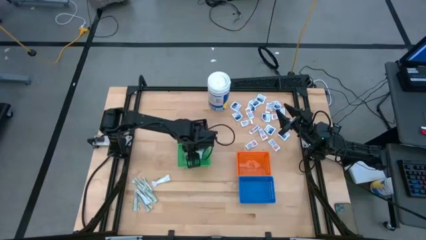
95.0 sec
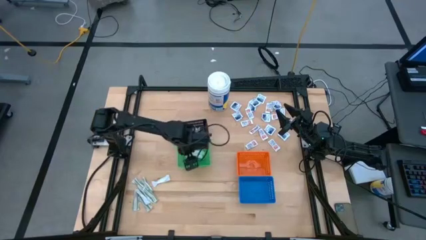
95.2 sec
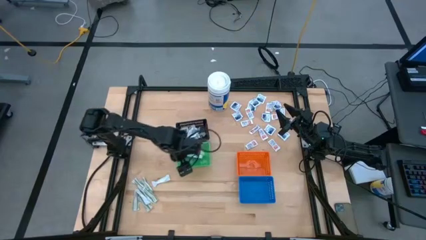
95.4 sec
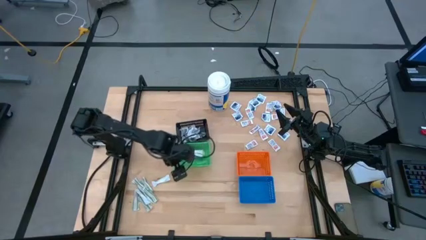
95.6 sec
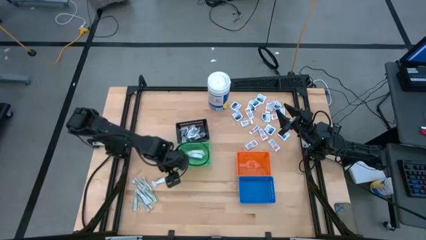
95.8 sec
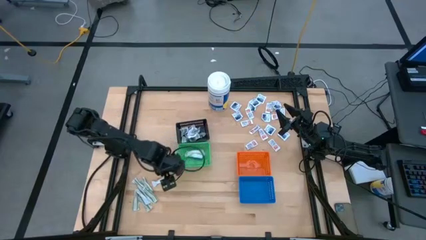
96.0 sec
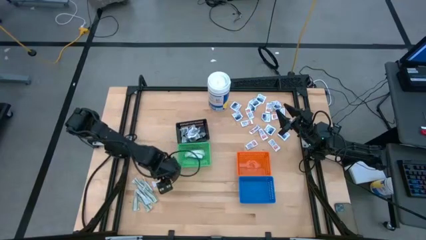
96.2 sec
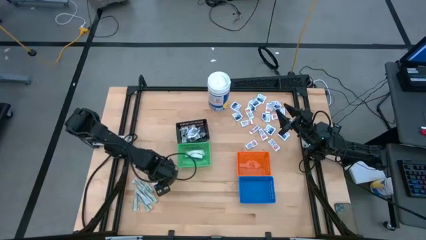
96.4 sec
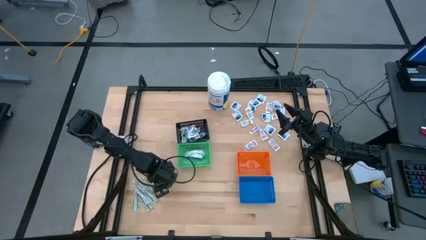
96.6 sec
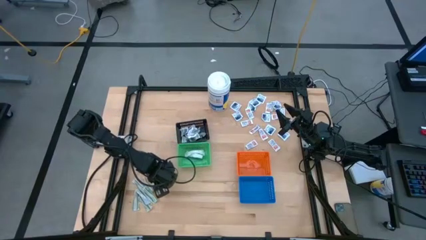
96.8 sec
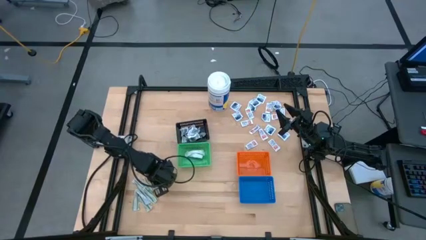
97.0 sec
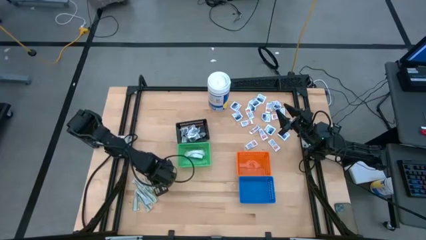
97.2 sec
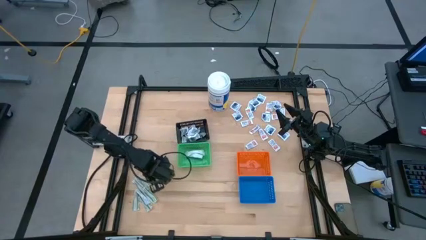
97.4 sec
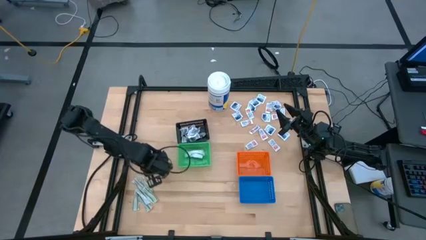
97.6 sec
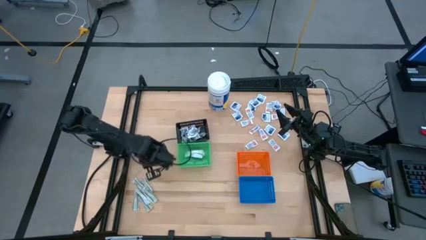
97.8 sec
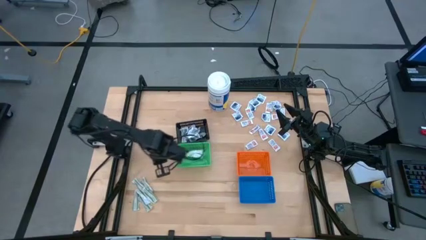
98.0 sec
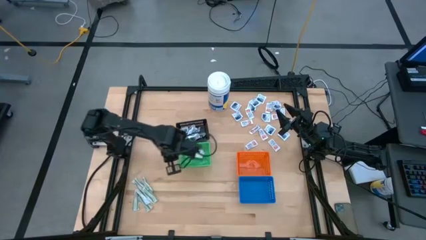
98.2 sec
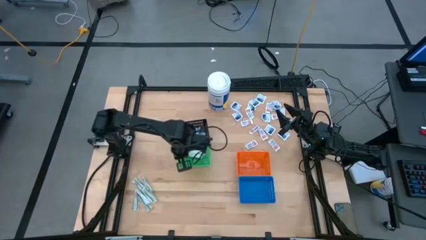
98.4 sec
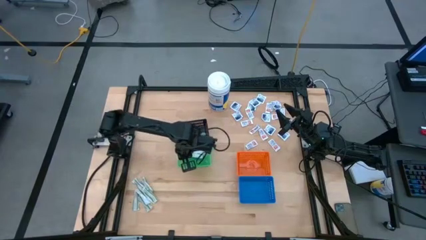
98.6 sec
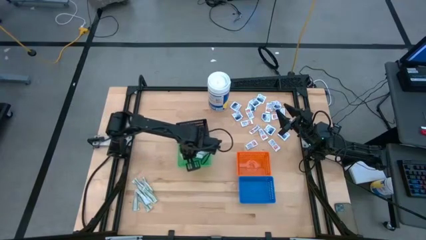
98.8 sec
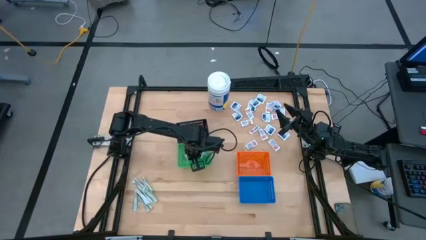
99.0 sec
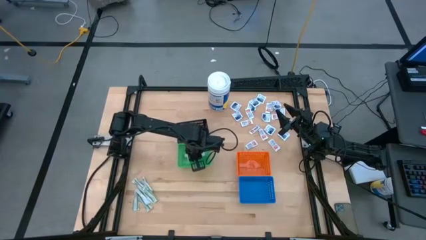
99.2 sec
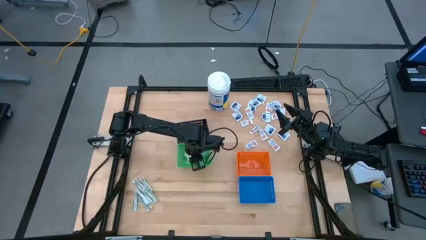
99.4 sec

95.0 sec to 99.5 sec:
Task: Pick & Place First Aid Supplies
Put the green bandage into the green bin

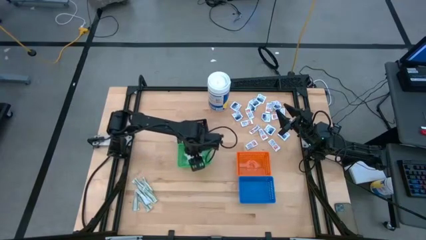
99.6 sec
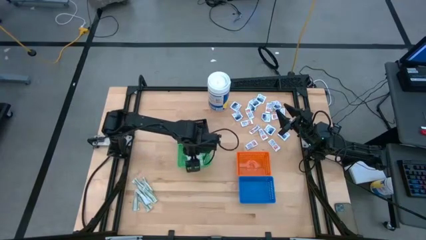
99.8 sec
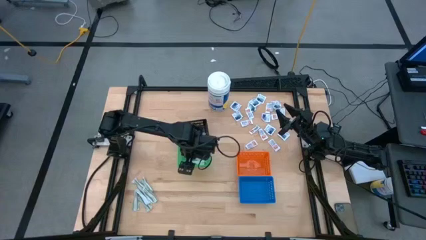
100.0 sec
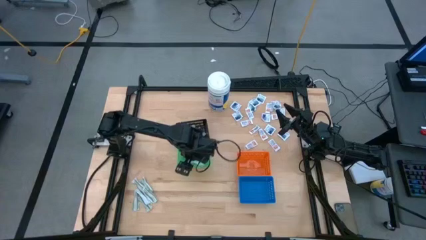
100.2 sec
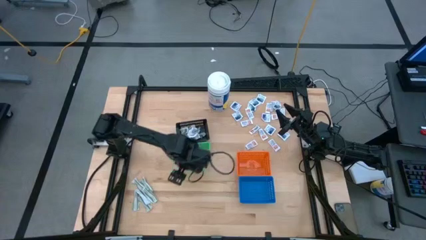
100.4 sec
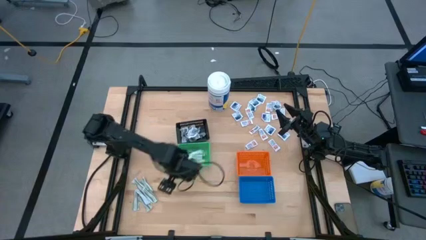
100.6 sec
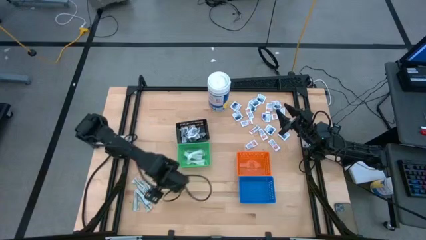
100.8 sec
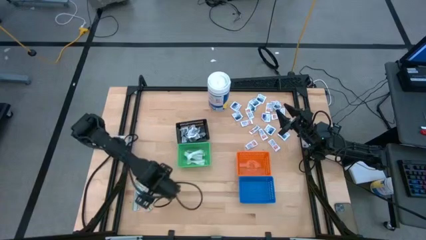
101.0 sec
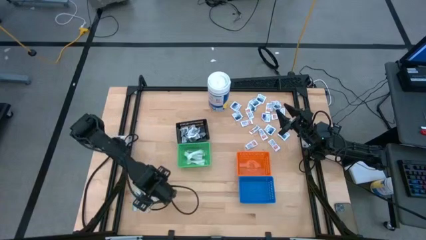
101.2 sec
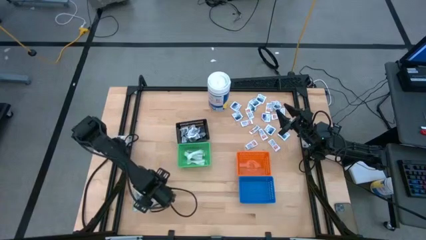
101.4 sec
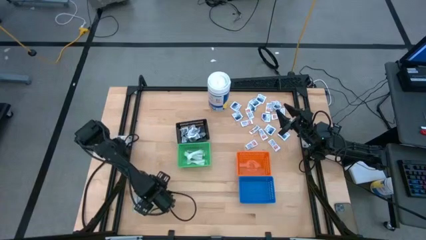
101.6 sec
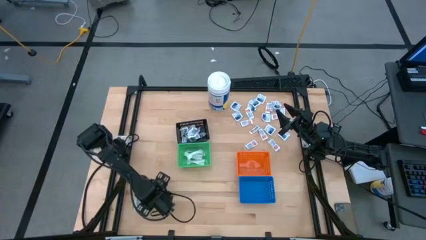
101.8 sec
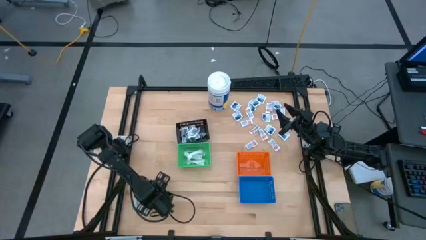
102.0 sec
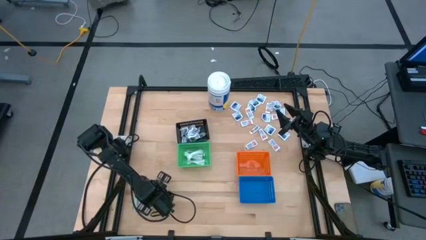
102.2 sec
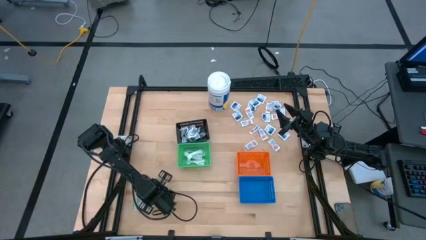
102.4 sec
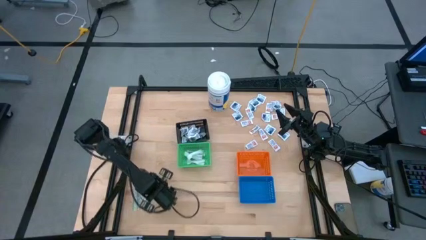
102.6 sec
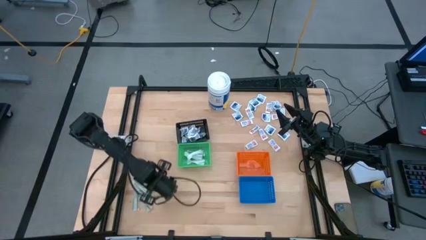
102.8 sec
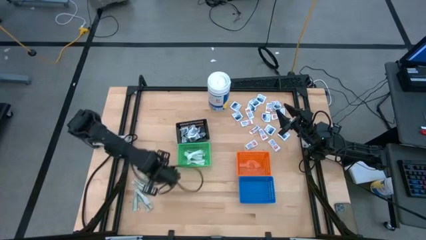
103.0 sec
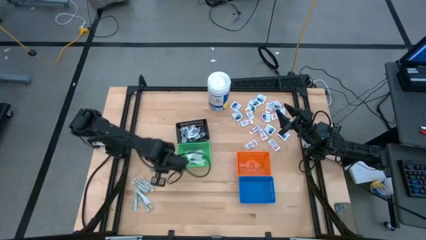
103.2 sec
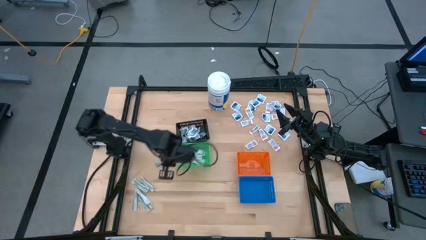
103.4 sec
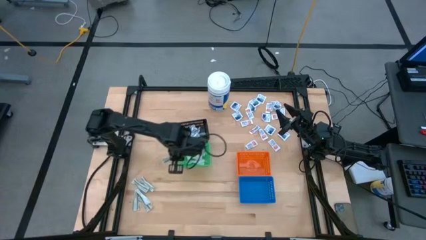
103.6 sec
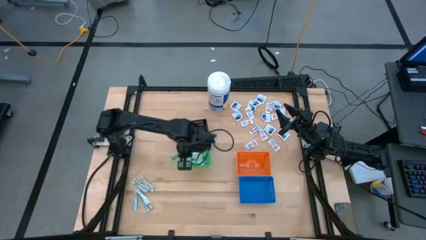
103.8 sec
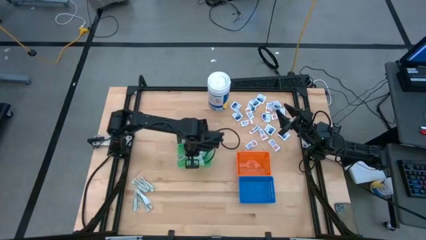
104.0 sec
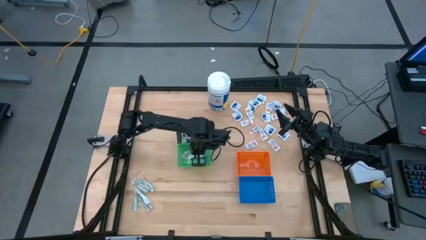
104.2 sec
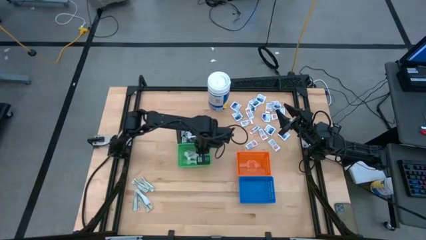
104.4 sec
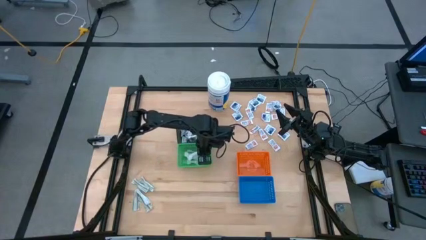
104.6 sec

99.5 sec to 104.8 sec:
Put the green bandage into the green bin

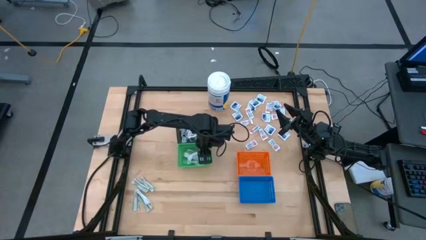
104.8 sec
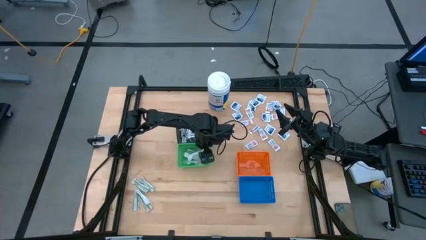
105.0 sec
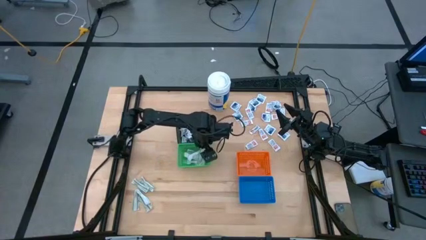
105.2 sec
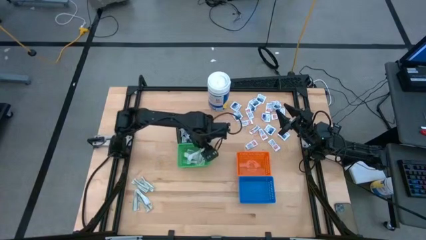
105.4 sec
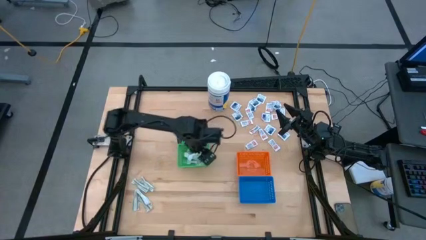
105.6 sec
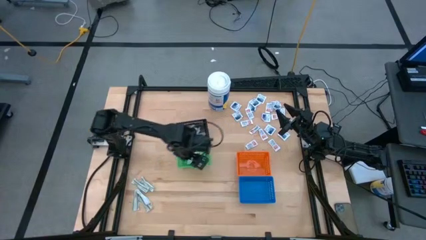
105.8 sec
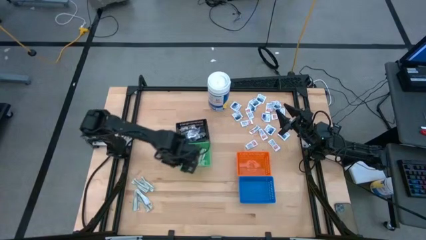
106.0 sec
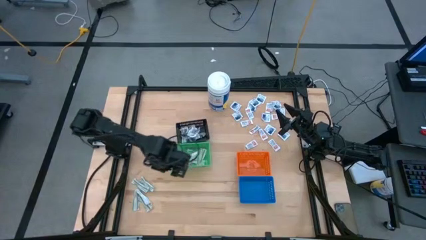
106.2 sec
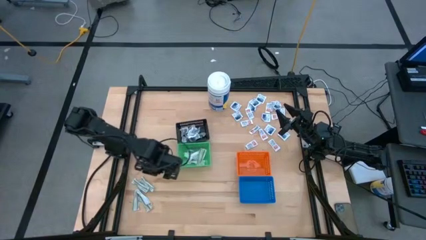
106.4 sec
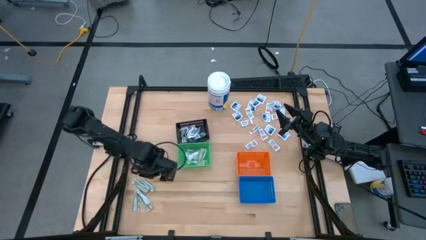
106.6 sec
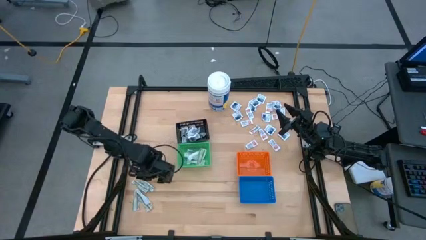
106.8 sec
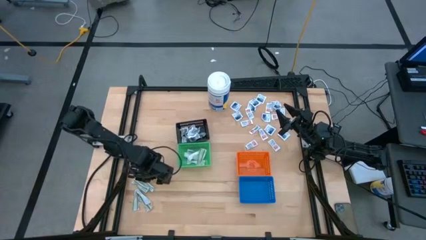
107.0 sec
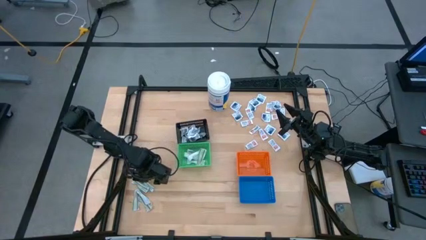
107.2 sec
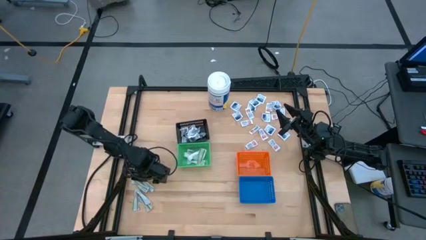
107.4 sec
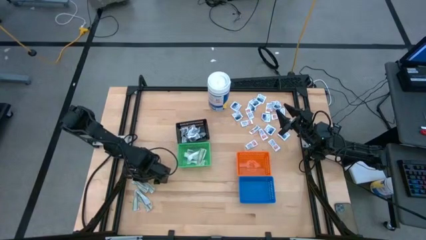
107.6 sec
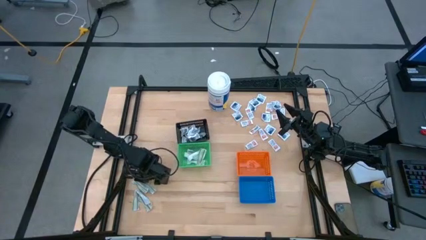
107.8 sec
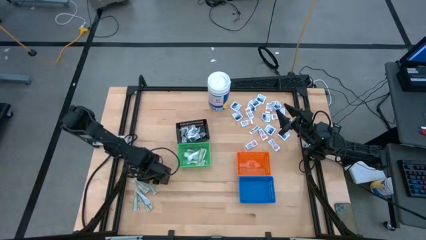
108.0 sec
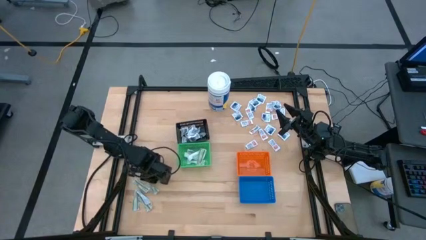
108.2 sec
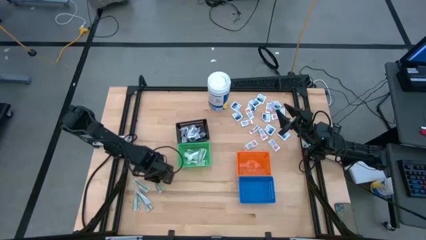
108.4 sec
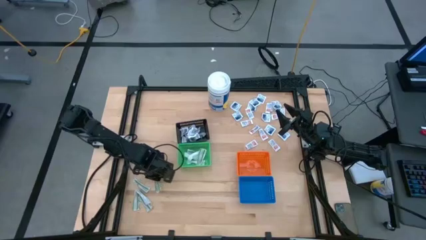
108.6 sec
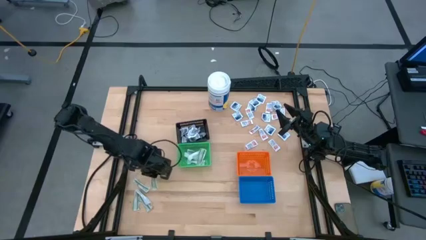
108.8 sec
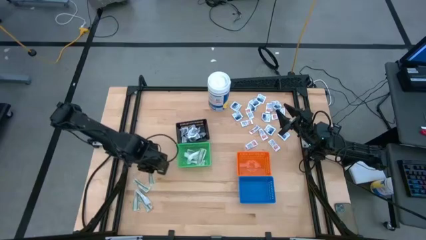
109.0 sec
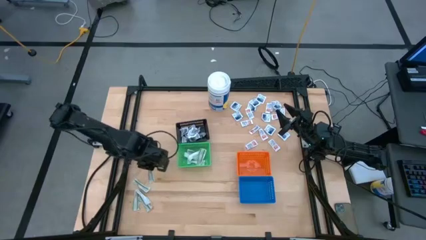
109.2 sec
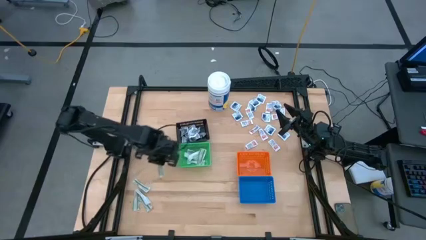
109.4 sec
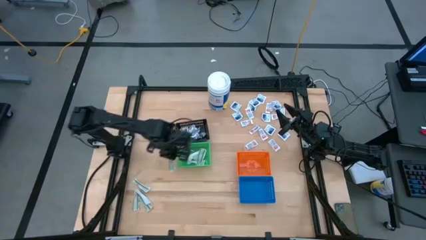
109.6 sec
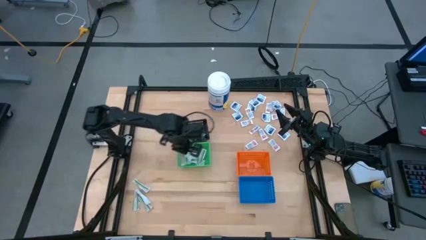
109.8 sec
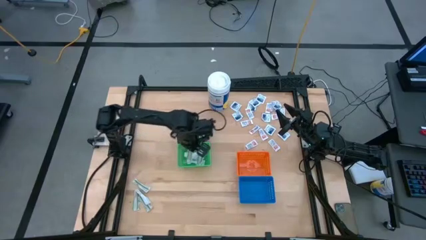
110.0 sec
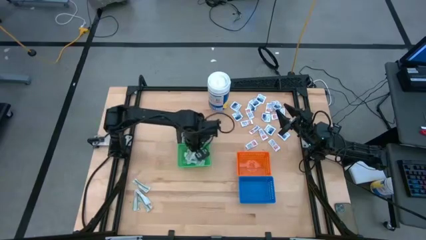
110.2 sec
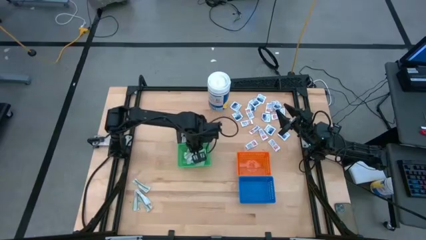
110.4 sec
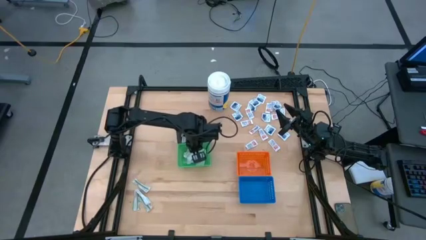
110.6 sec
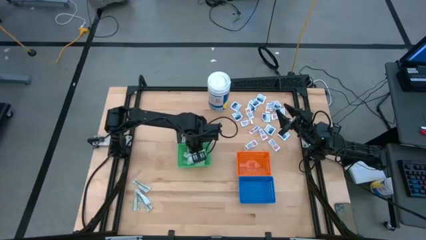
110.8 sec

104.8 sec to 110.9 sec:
Put the green bandage into the green bin
